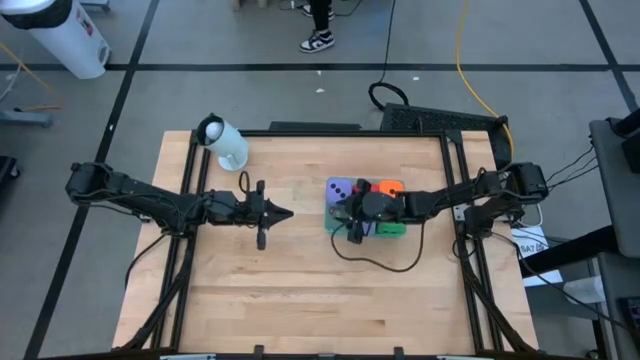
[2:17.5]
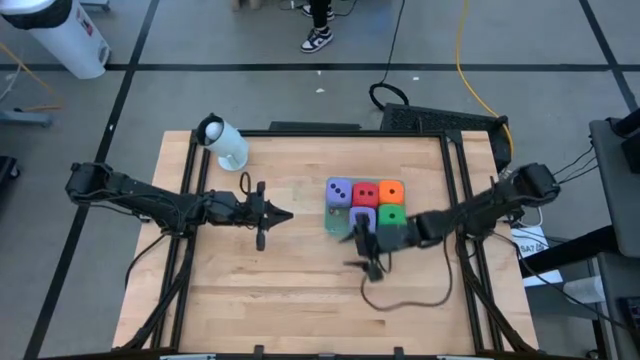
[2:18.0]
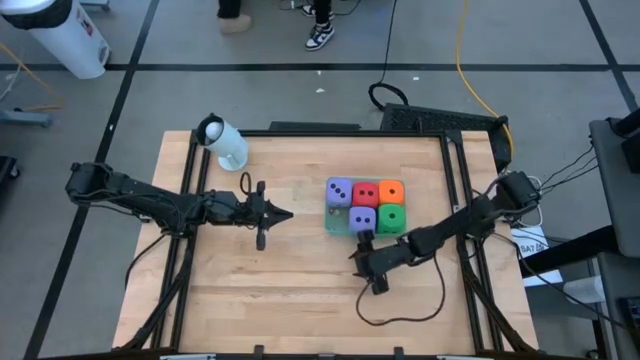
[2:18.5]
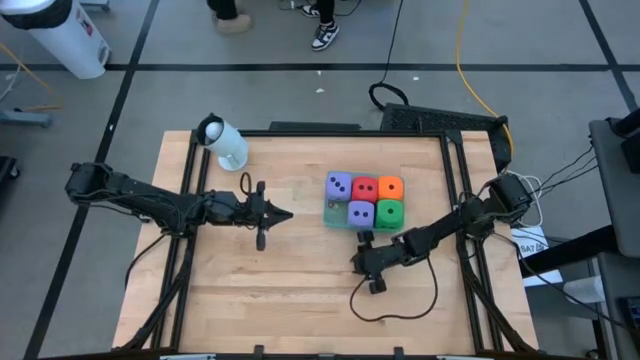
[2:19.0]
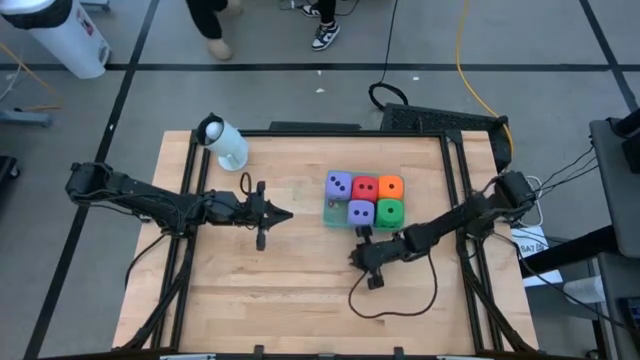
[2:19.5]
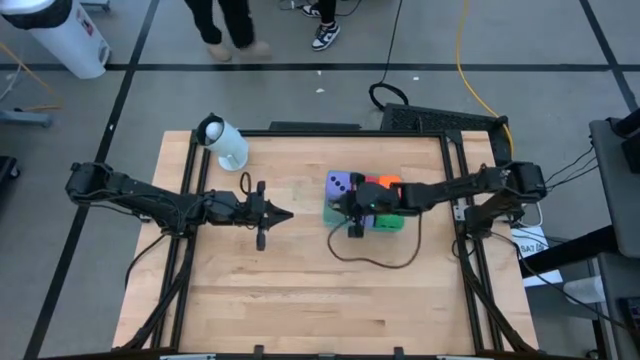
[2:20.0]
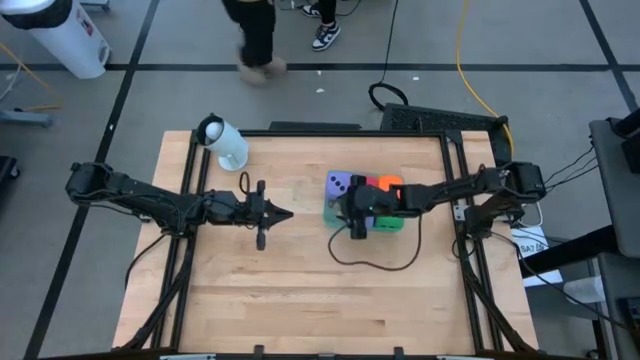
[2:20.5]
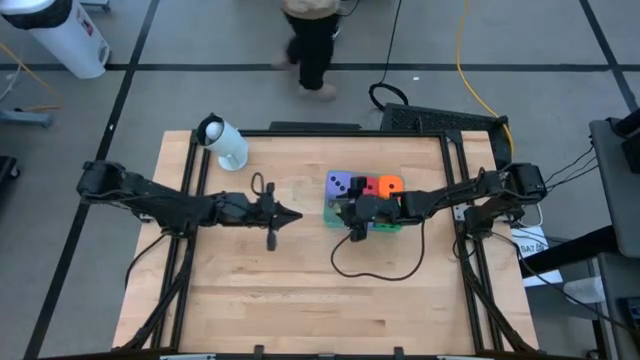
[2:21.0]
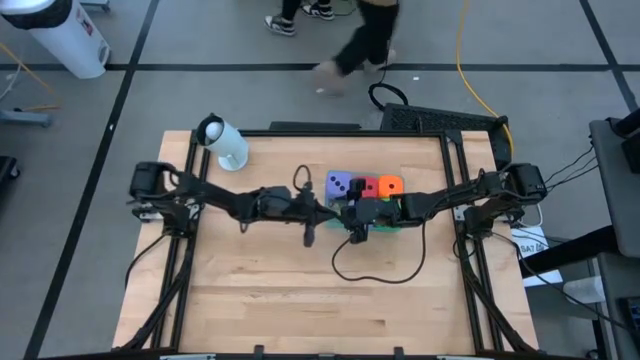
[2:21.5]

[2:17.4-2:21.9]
Task: Pick & Place Dice
Put the small yellow die into the green bin

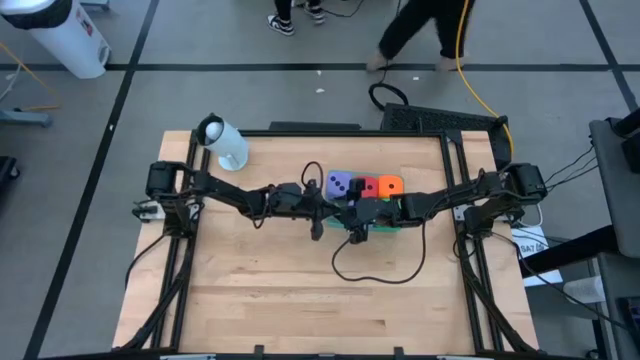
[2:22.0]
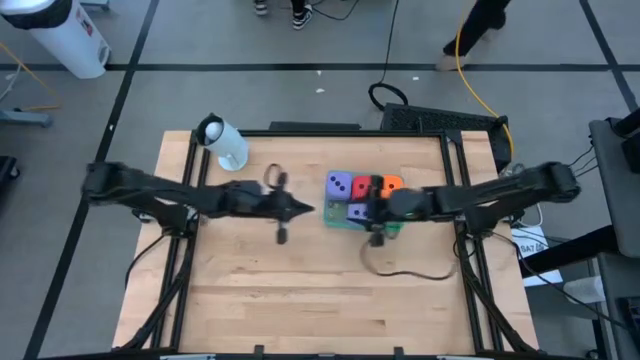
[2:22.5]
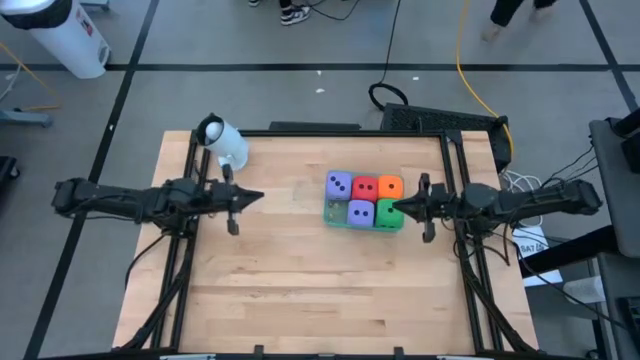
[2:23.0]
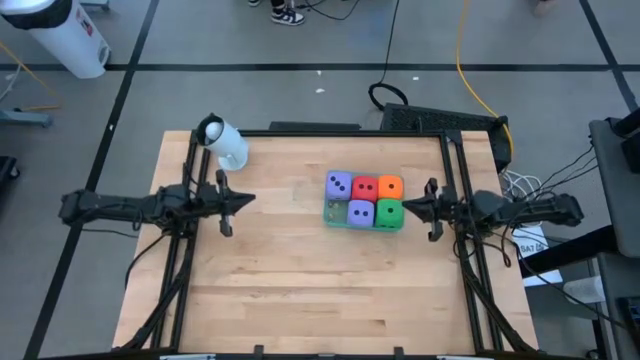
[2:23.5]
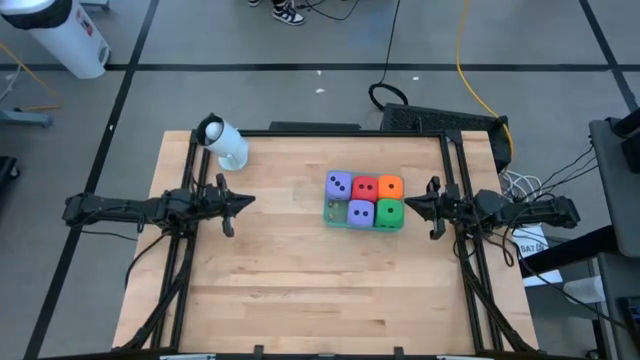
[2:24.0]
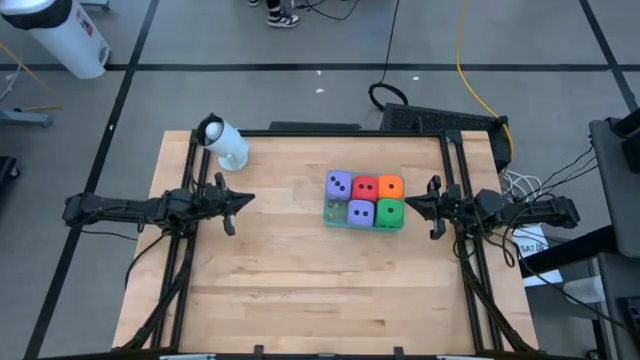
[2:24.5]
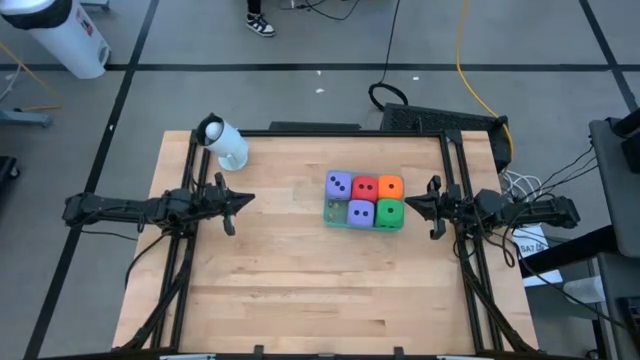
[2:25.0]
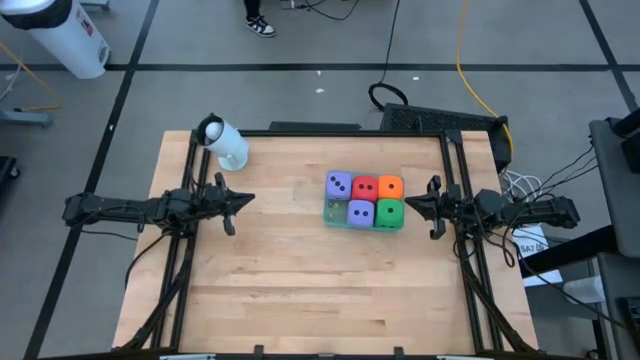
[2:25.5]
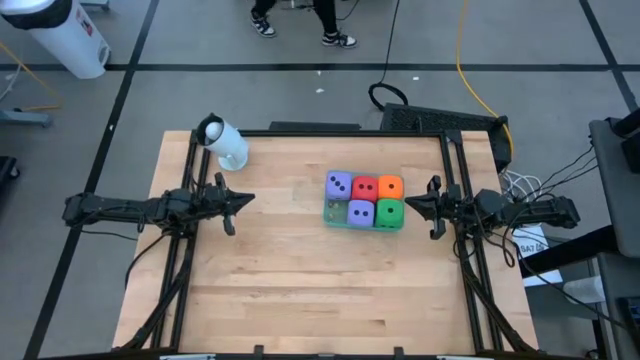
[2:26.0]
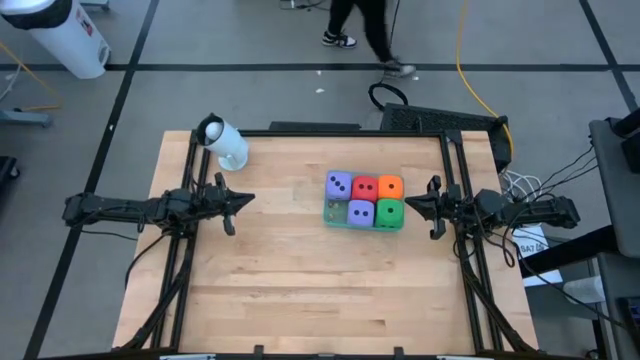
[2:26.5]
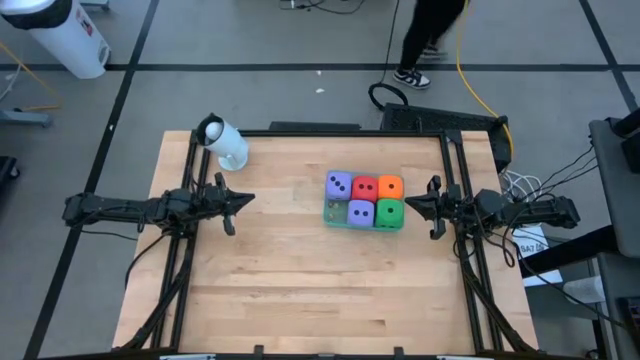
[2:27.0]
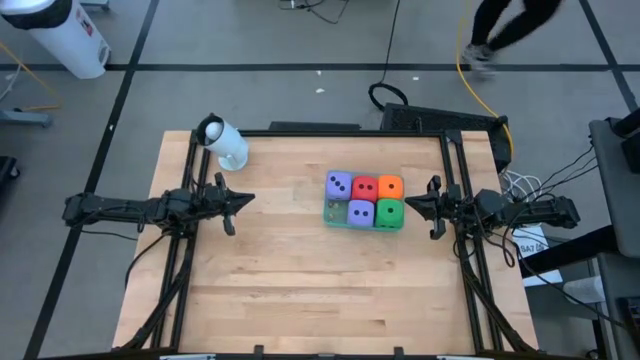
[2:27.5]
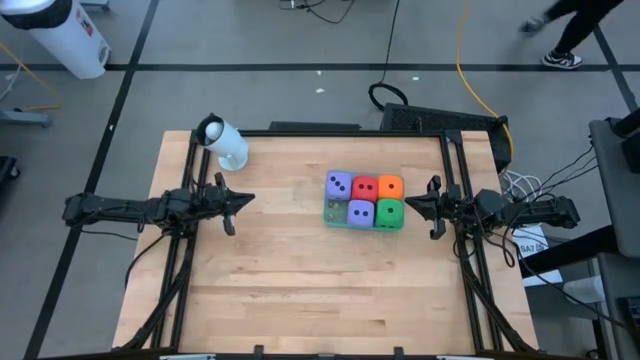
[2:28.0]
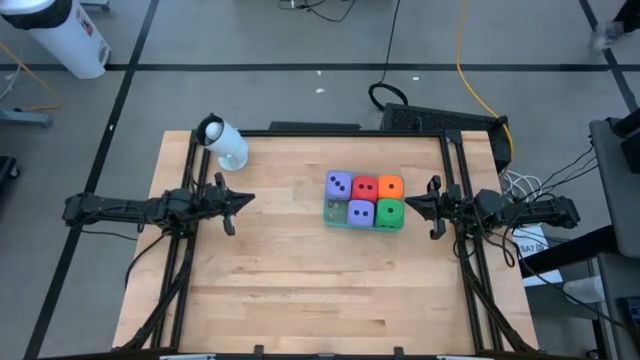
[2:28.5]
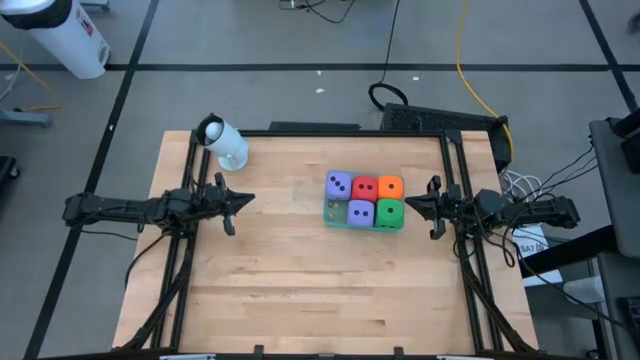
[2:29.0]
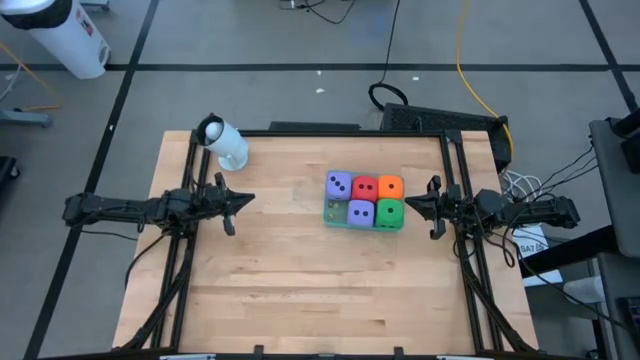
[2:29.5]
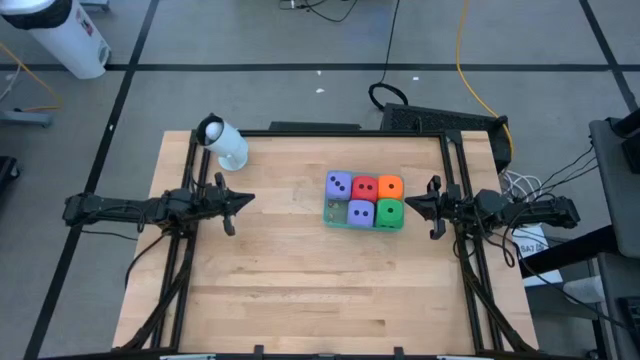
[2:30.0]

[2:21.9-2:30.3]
Return to Home Position

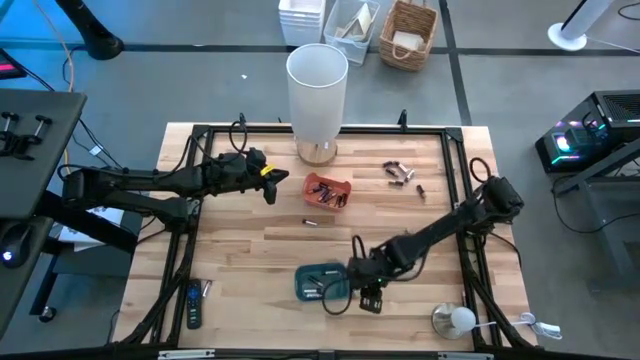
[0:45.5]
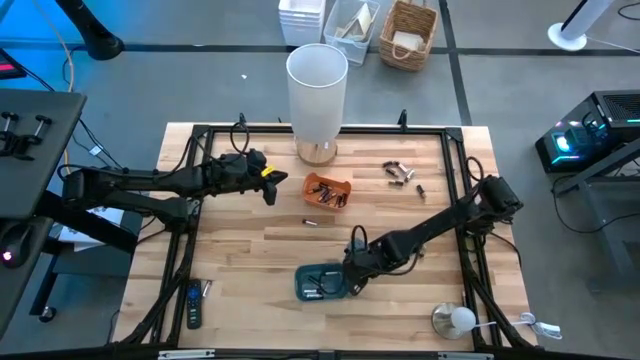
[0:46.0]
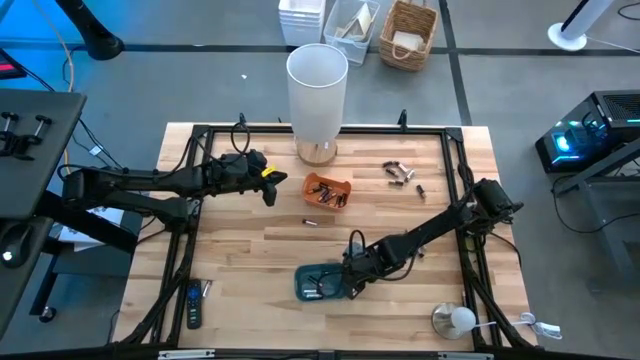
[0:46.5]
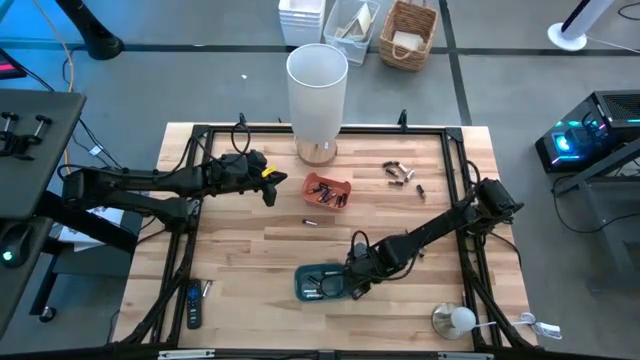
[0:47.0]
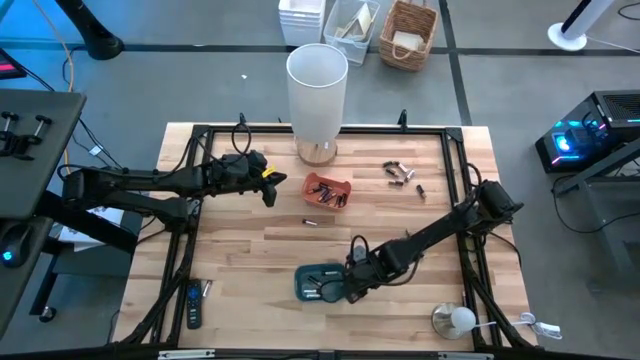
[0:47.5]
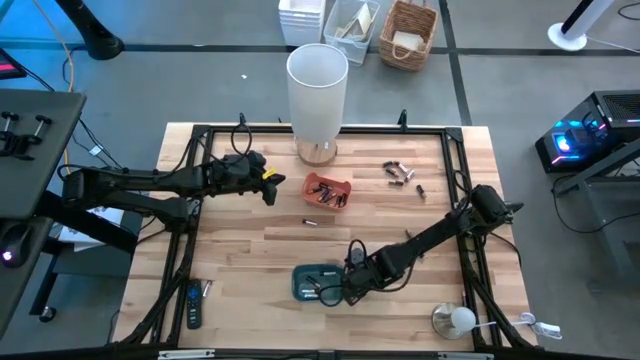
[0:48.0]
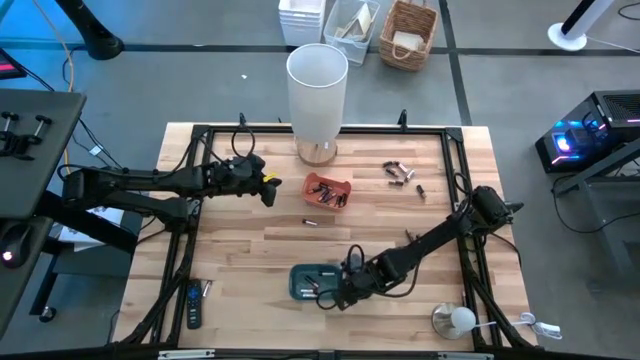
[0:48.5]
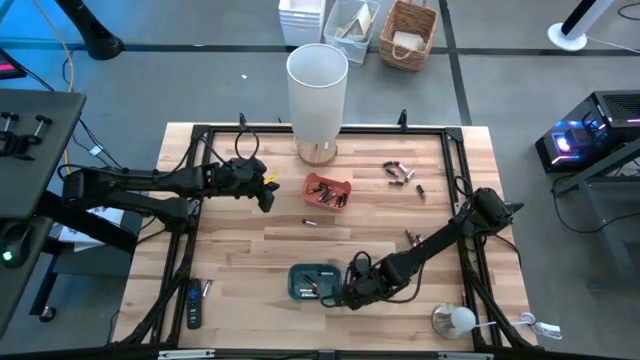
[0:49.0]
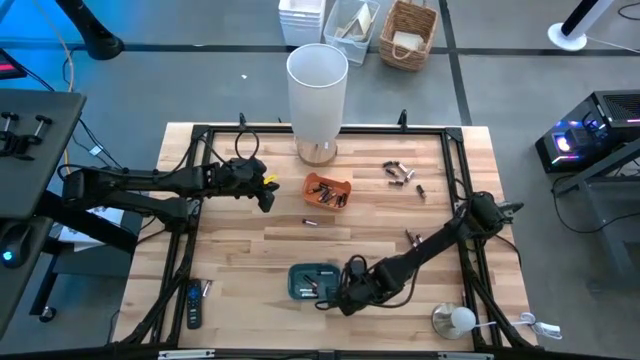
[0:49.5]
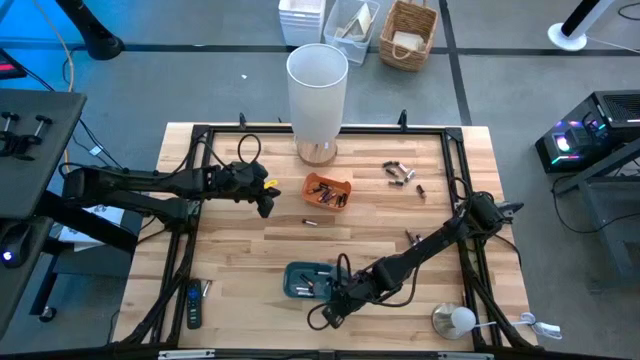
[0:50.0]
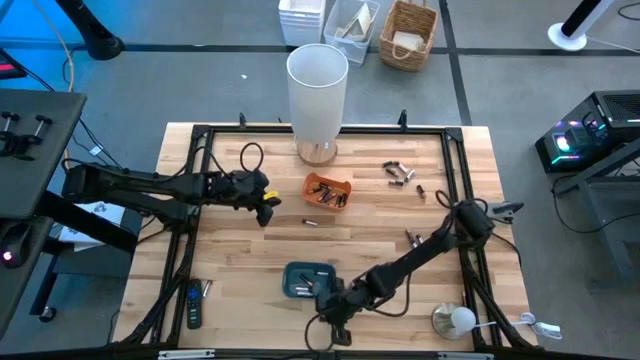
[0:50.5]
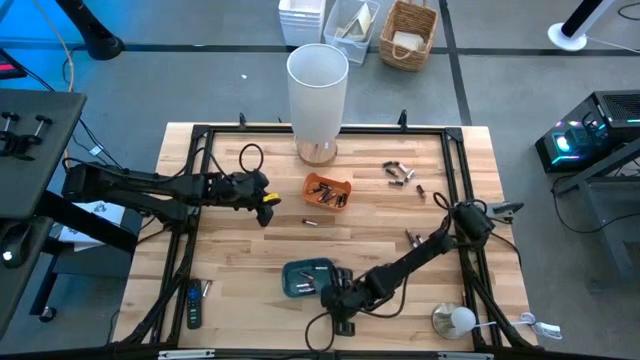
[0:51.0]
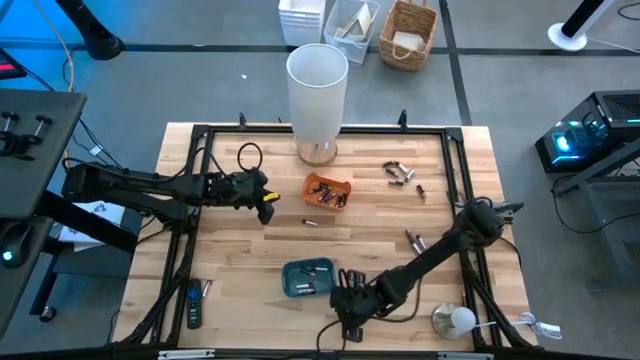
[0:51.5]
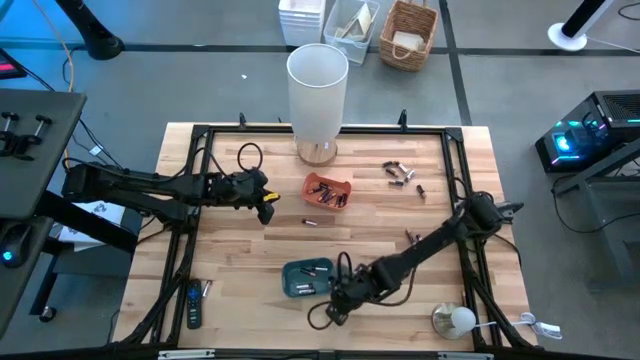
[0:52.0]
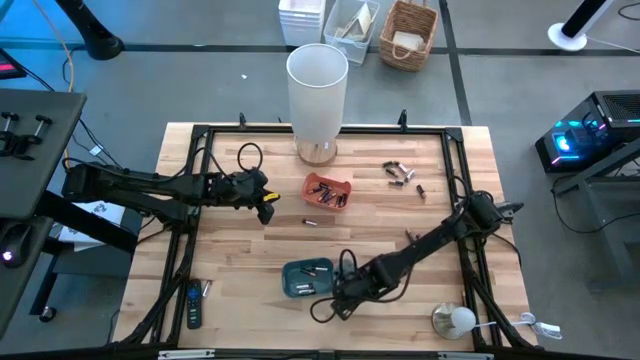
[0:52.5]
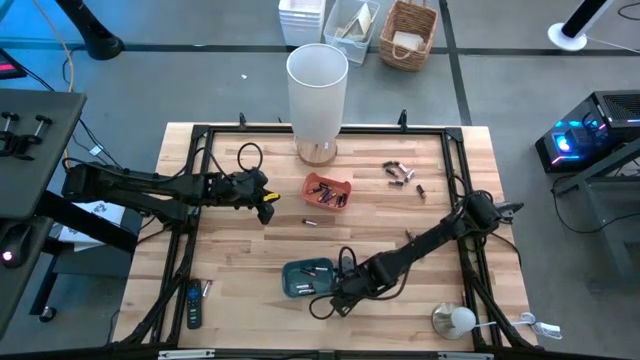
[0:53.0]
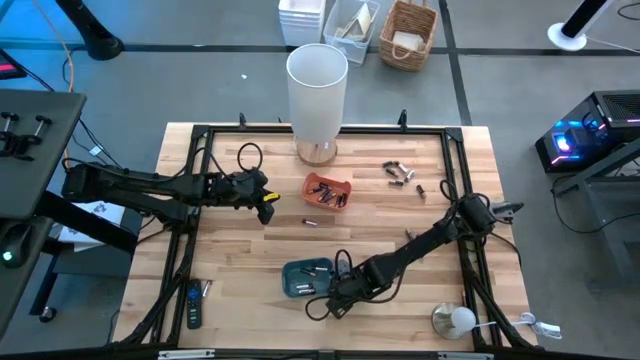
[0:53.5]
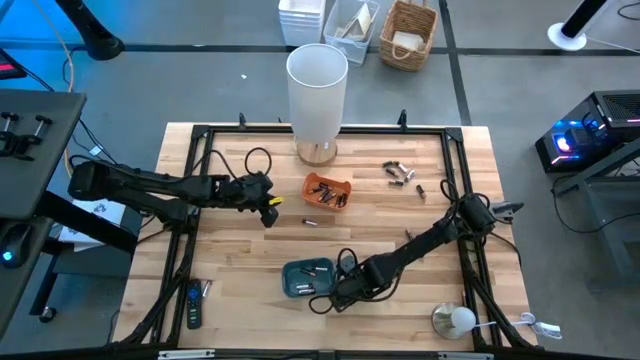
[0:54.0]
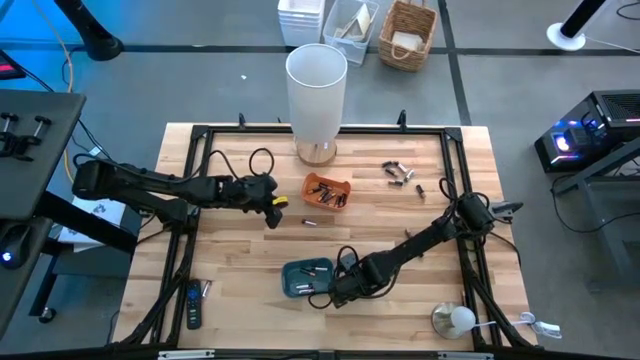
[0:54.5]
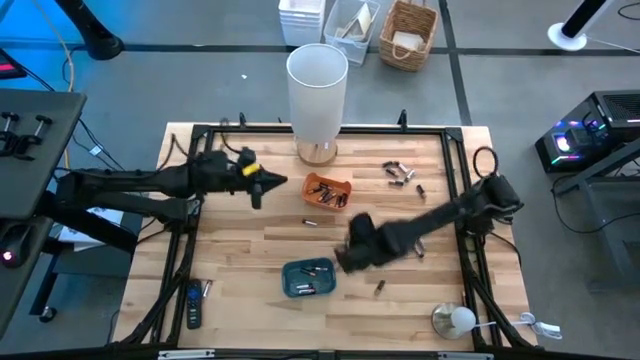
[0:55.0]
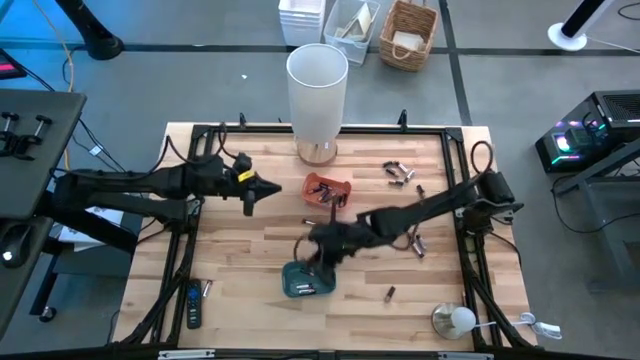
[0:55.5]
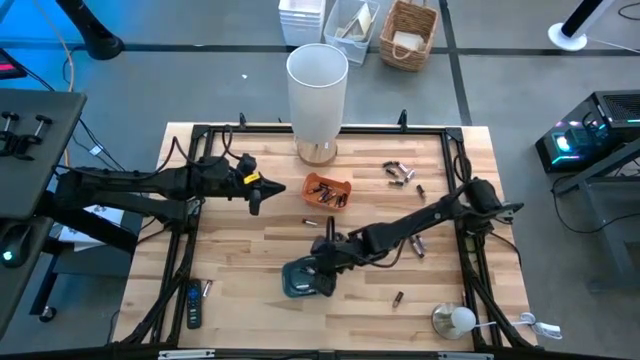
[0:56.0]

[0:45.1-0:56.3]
Task: Sort batteries
Put the silver battery into the blue bin
